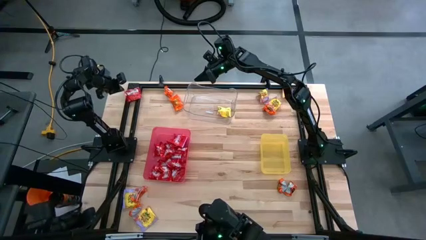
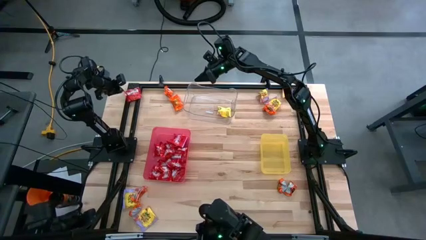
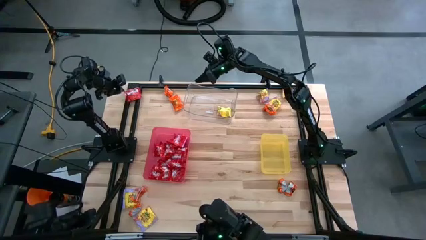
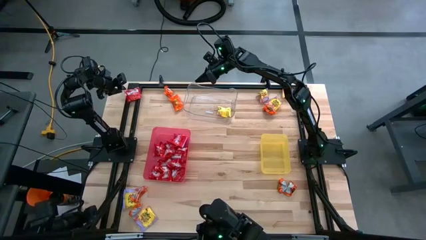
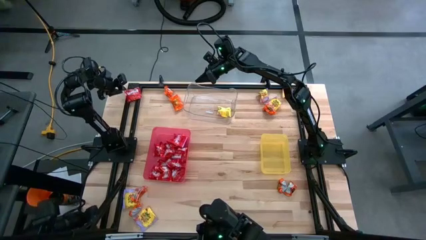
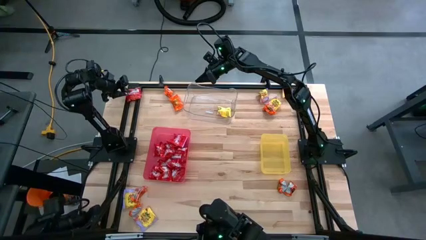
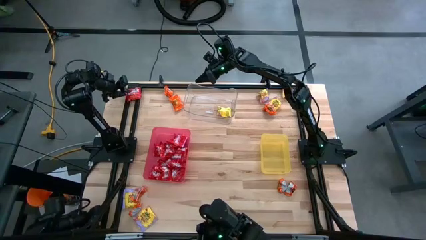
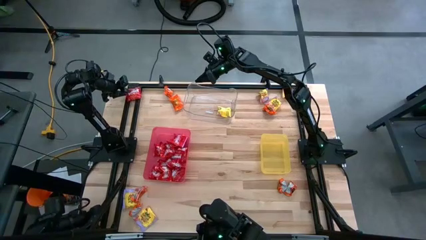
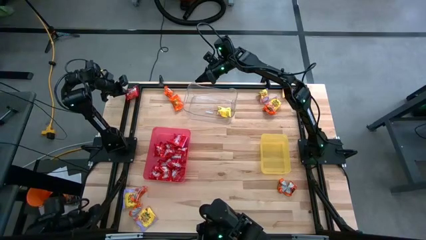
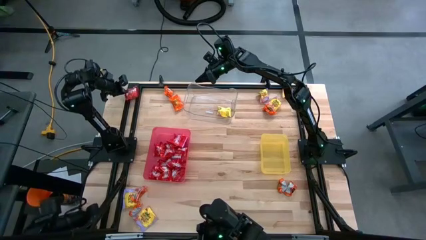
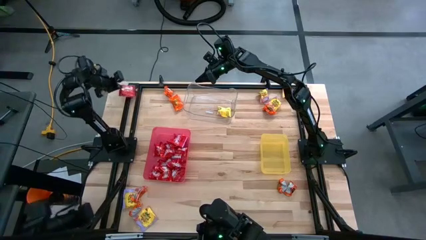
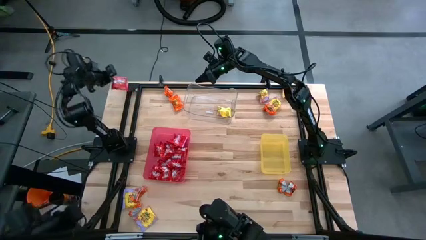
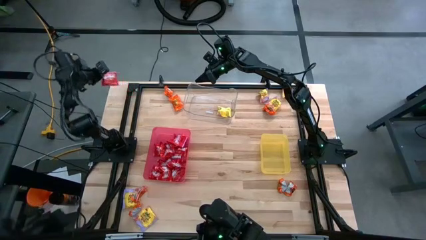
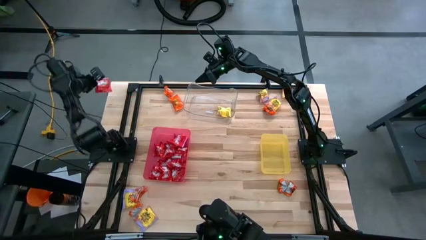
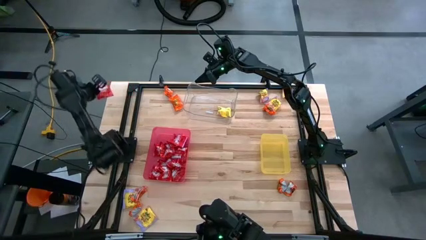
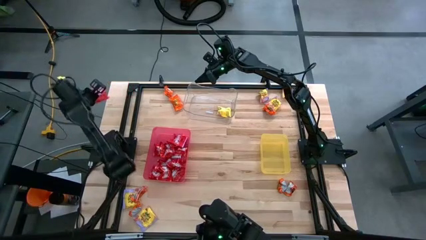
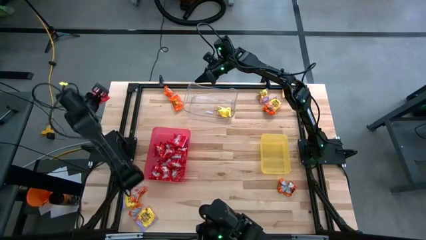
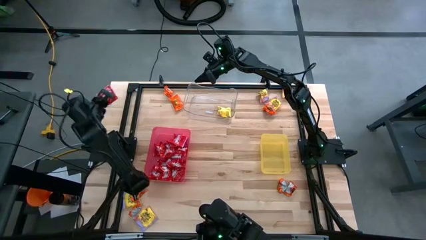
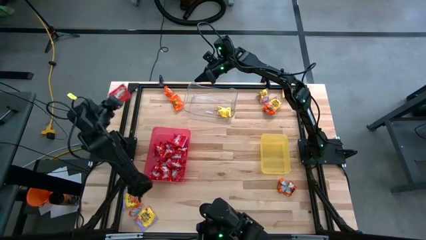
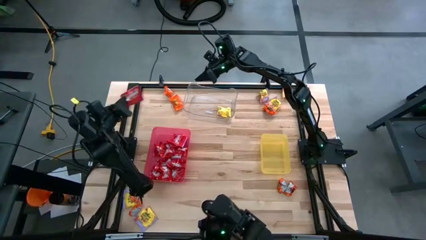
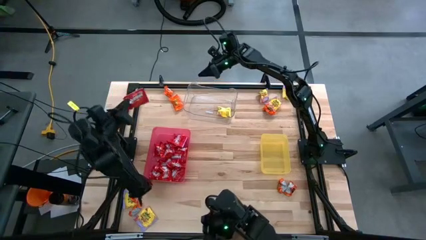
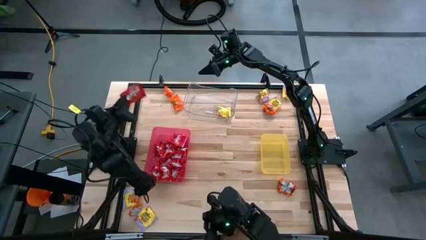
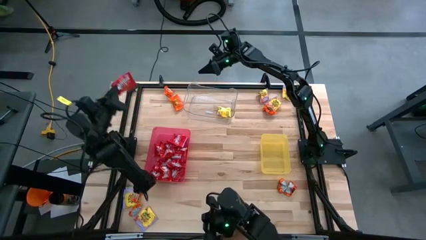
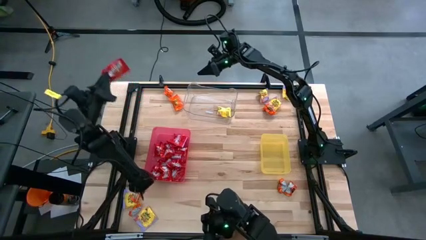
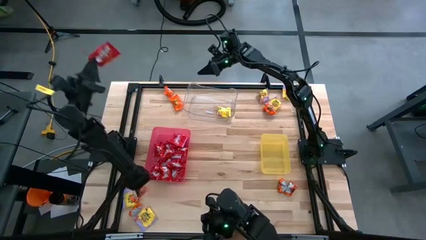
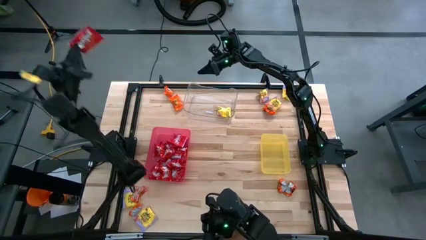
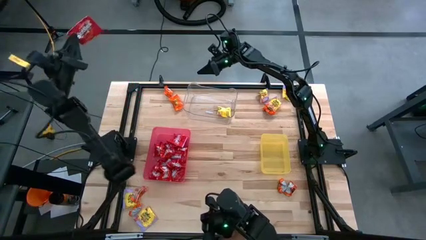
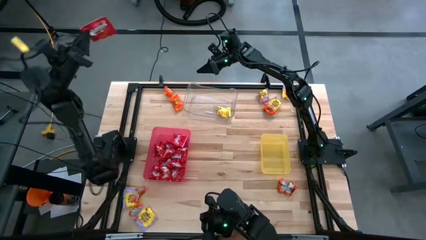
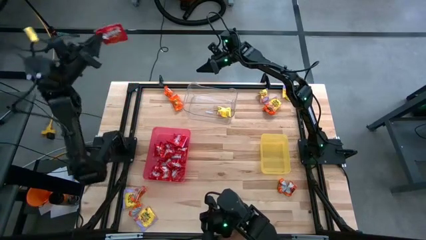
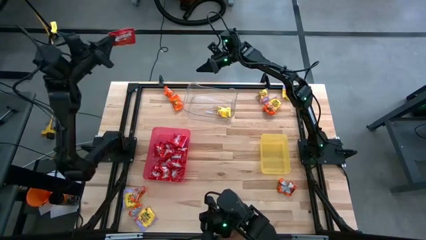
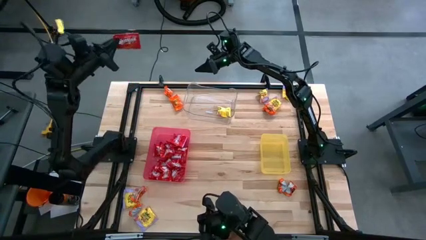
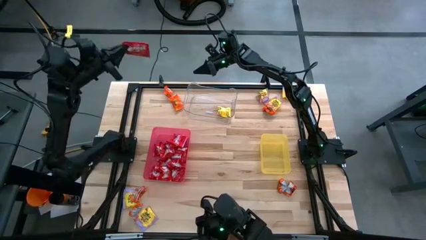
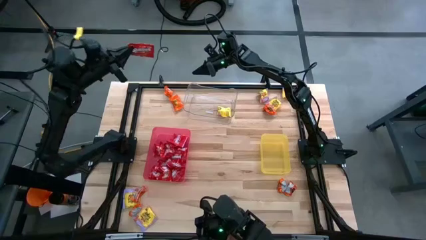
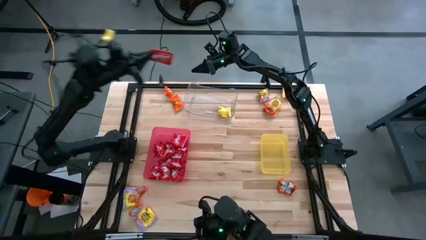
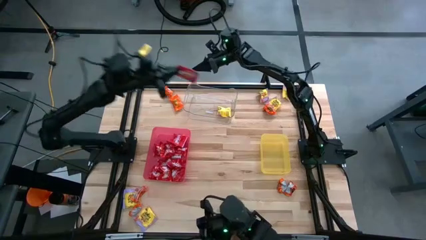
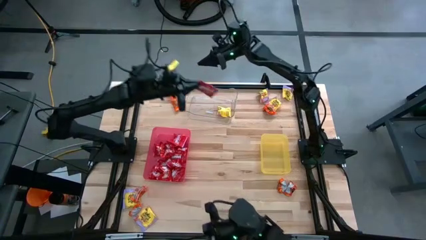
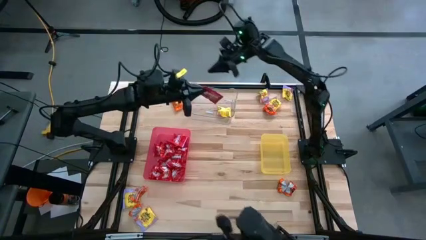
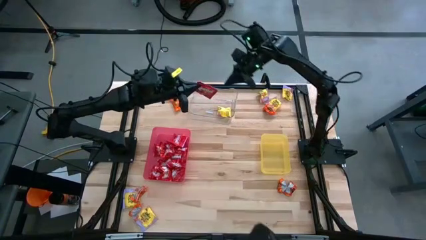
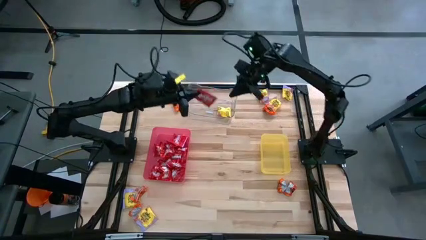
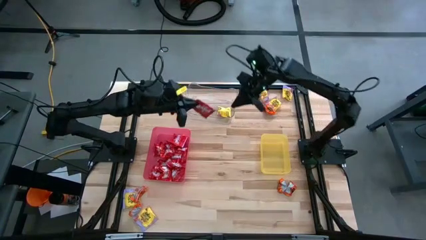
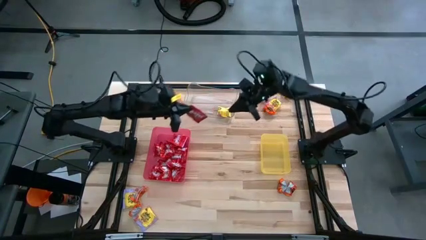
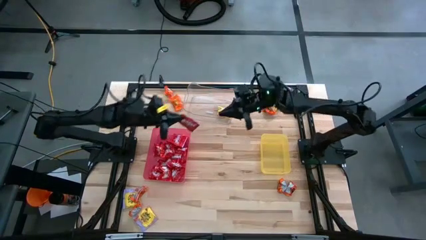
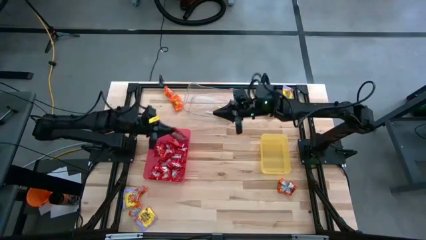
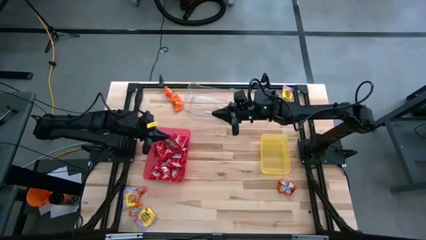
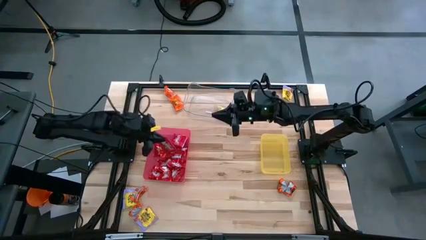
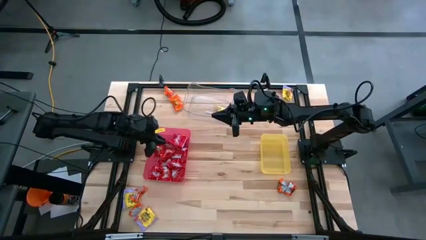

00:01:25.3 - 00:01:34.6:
Task: Sort candy
Put the red candy into the red bin

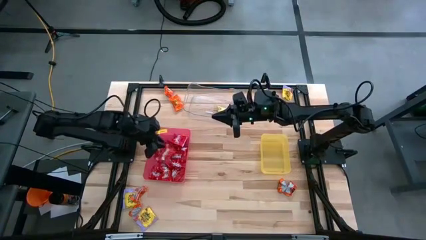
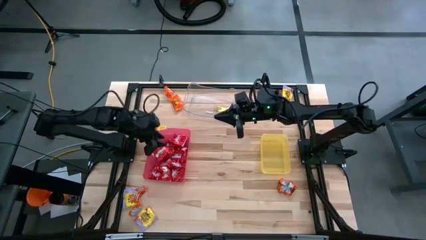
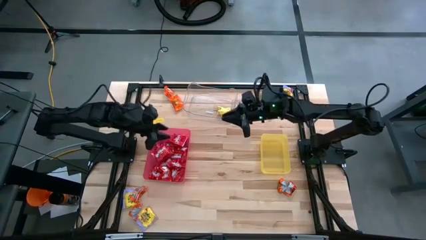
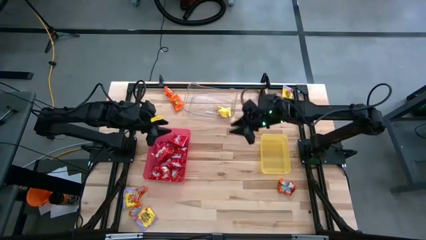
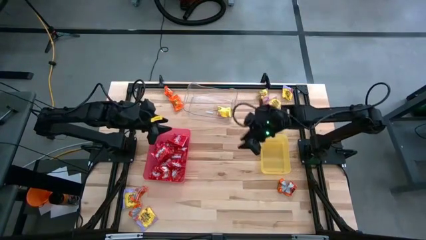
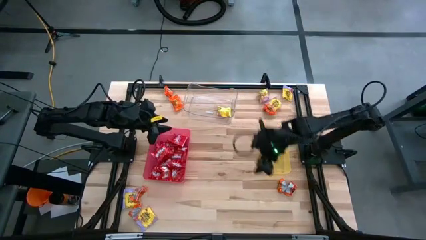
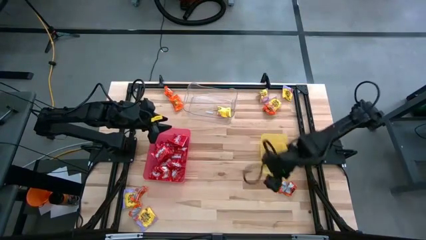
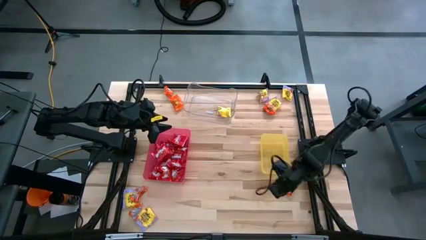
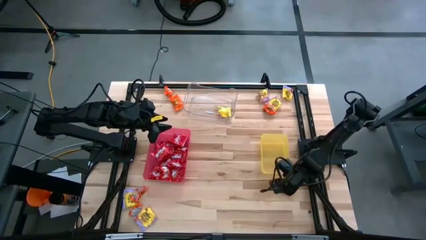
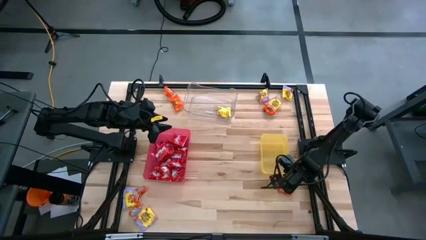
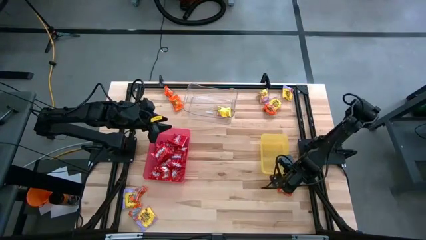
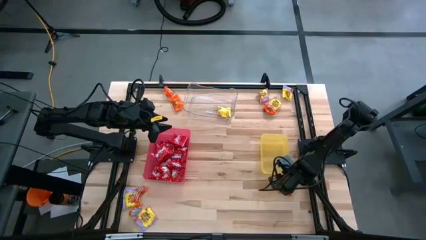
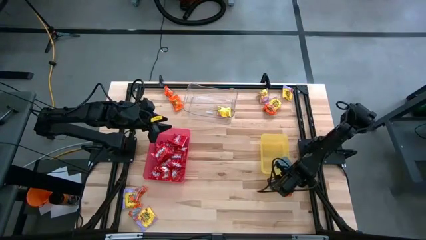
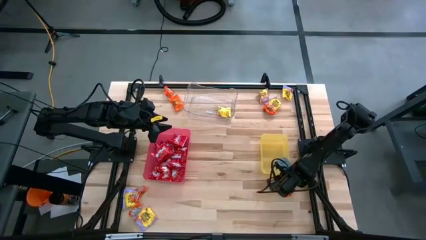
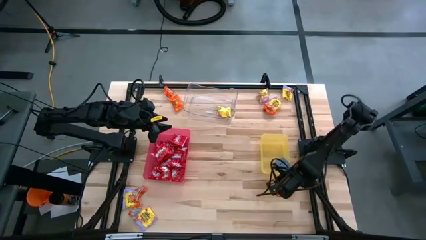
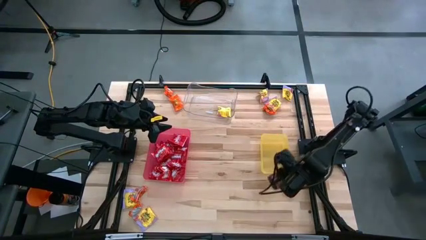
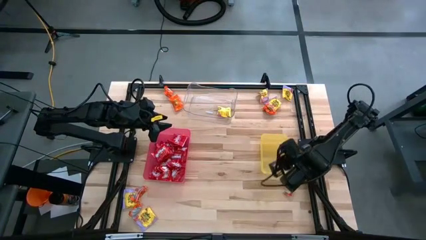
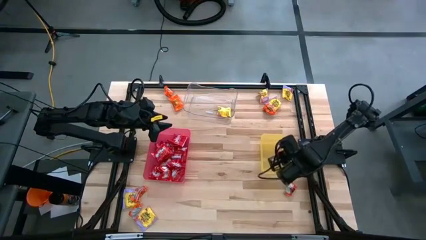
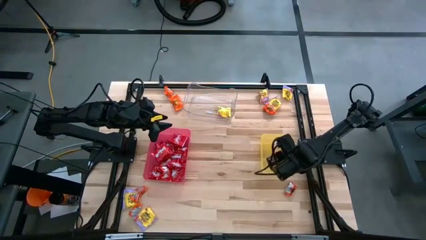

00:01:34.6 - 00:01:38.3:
Put the orange candy into the yellow bin

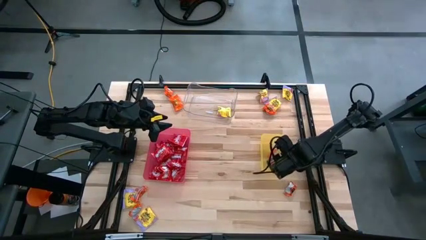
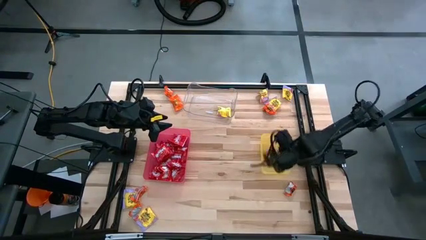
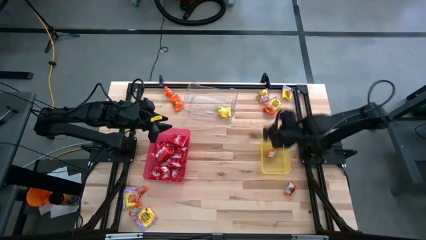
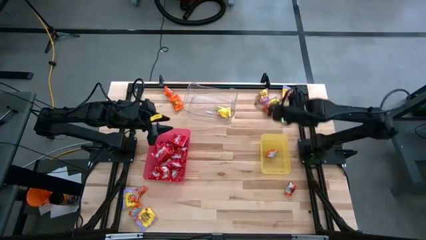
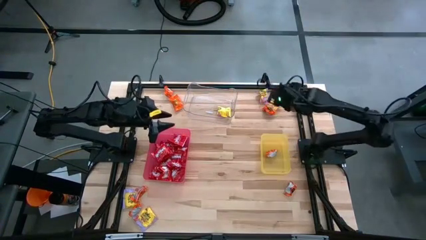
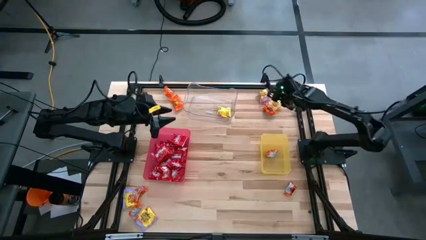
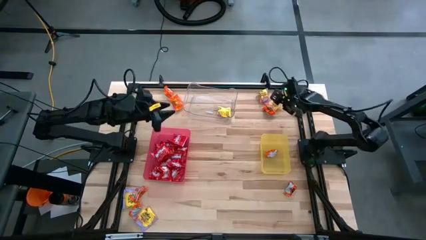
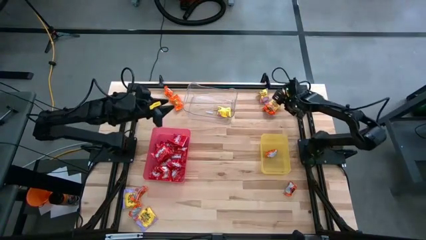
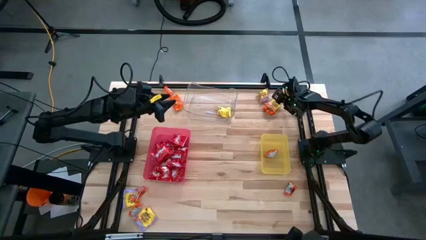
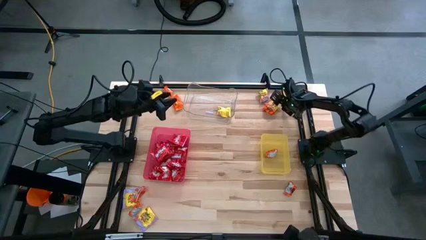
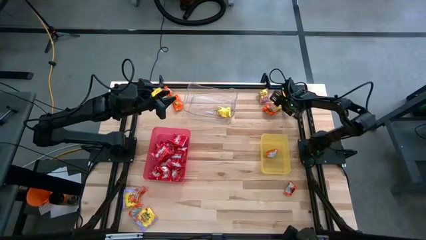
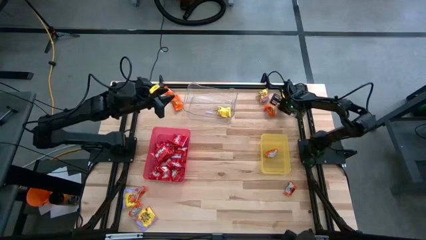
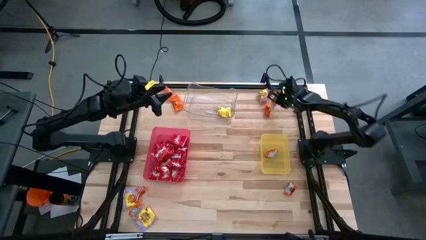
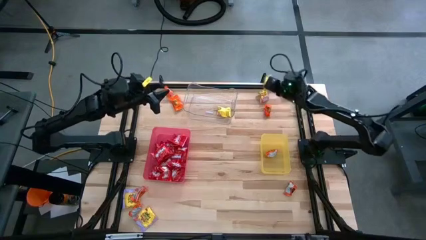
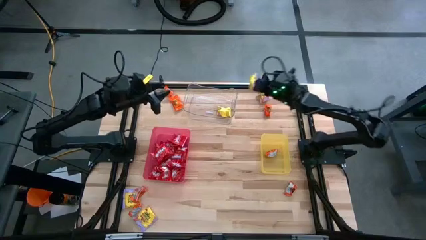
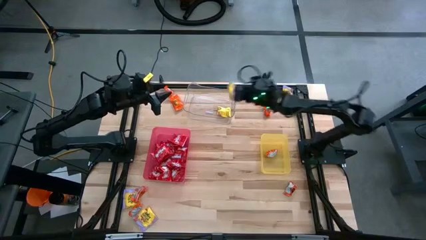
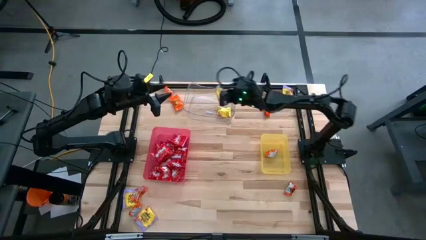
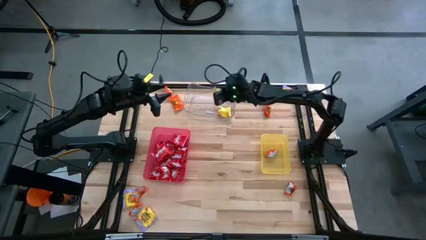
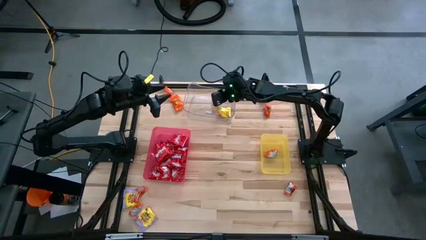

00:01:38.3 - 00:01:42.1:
Put the yellow candy into the transparent bin
